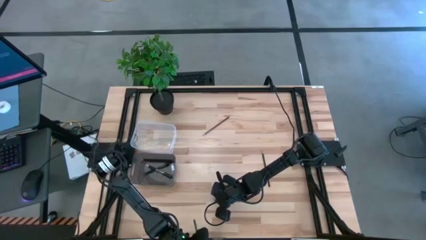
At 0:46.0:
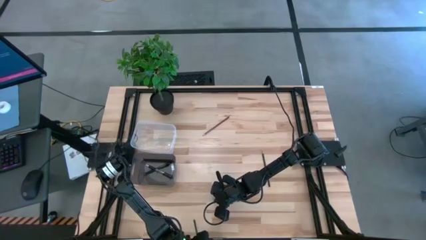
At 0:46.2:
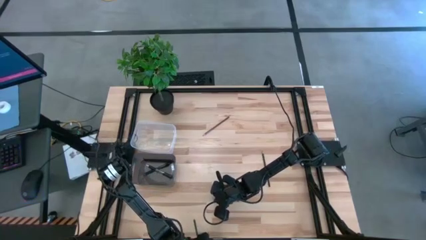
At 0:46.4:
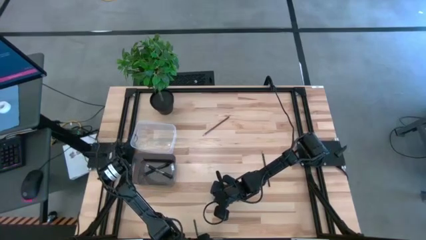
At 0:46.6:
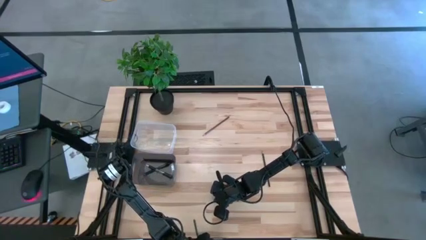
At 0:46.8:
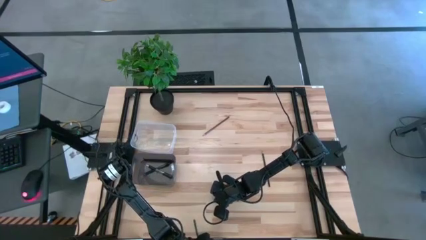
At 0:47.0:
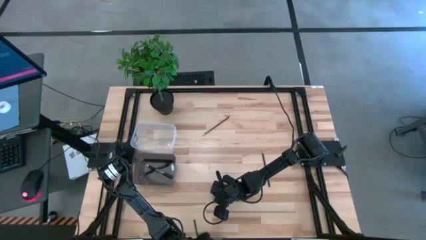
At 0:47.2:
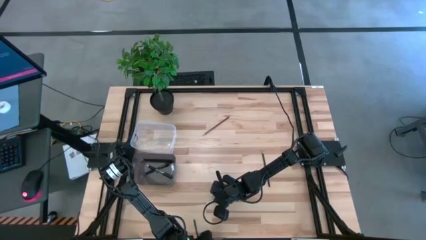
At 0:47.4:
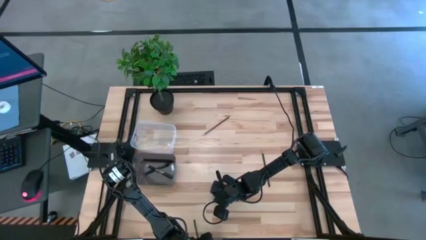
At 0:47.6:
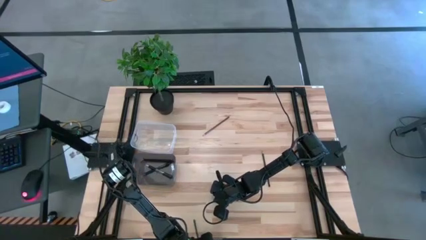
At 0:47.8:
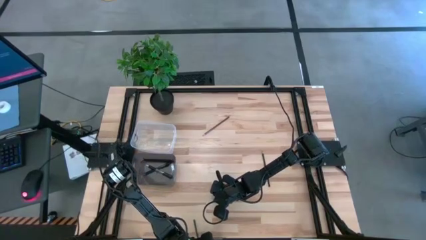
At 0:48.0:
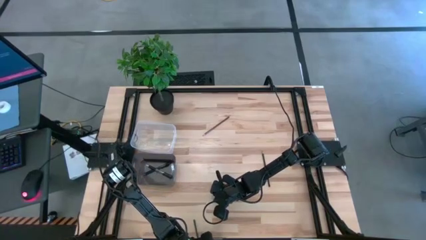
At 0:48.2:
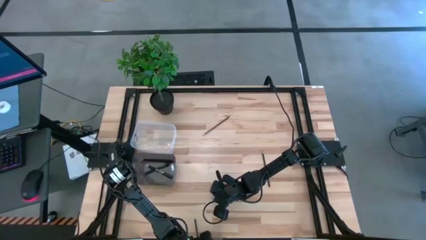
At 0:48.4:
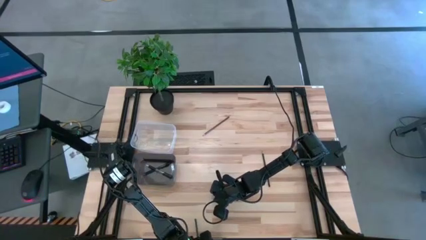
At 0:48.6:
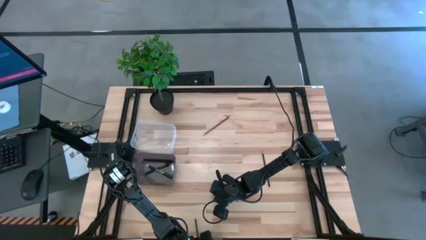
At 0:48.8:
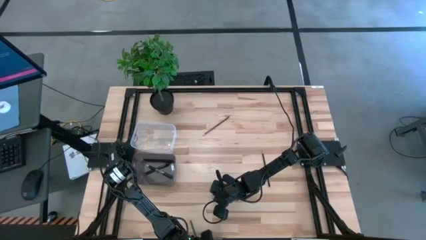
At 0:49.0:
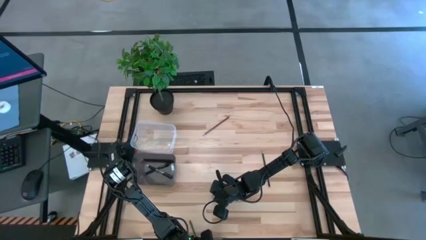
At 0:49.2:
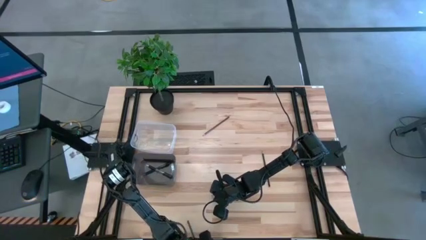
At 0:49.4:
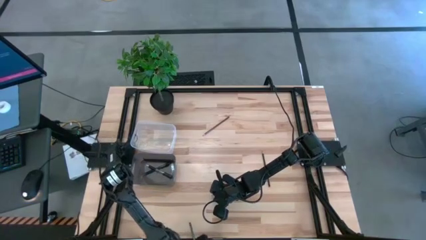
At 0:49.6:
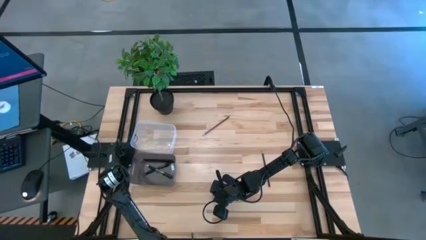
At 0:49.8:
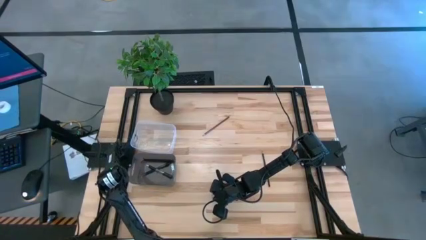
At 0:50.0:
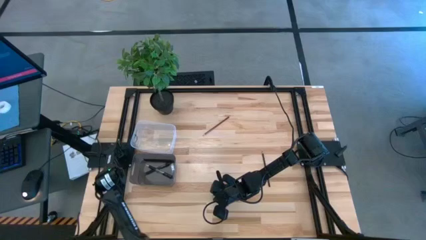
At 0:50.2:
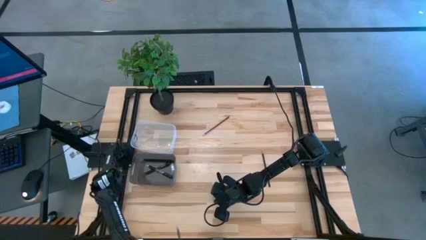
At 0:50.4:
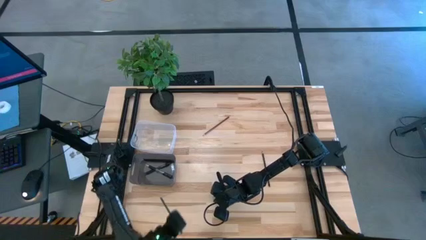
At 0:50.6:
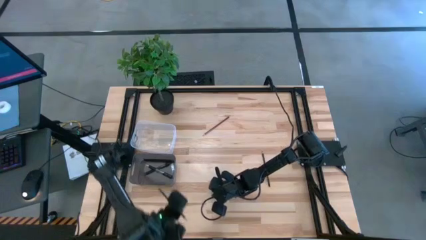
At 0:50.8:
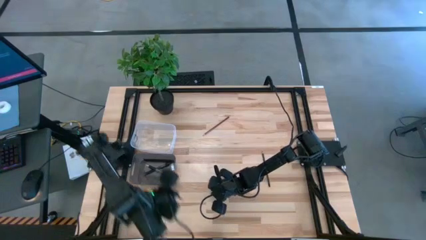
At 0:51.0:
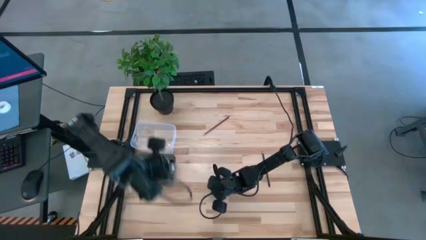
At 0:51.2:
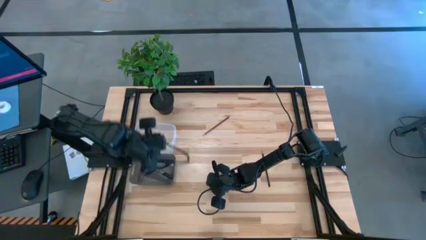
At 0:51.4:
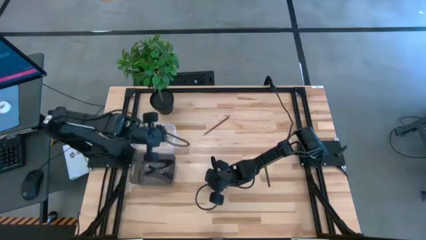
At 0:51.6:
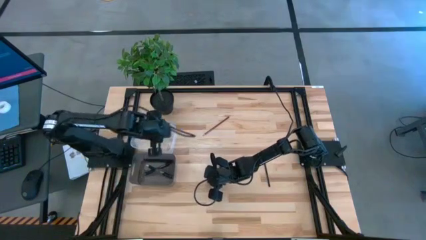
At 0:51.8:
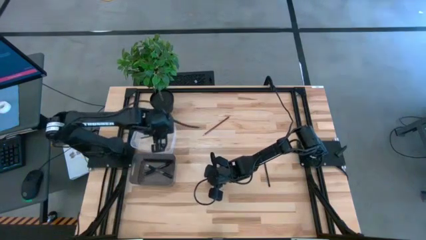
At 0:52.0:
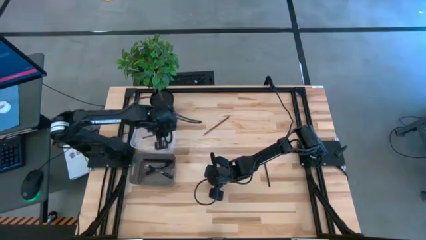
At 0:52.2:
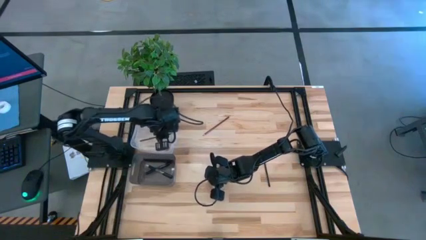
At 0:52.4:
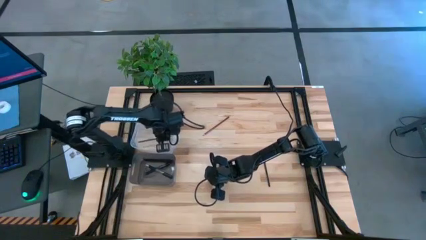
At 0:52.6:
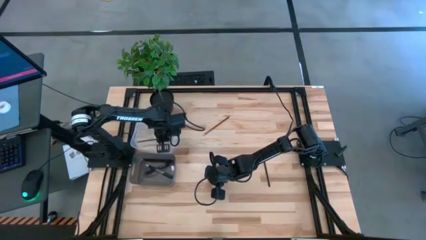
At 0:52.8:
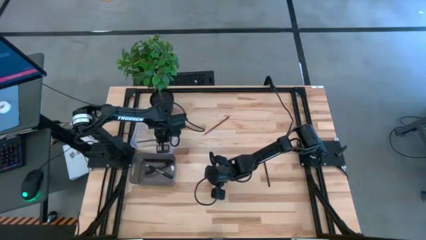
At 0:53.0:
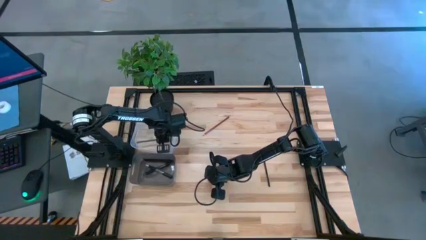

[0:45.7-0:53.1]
Task: Sort pens & pencils
Put the green pencil into the transparent bin

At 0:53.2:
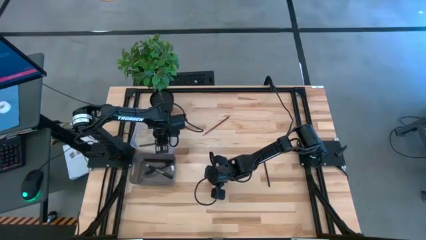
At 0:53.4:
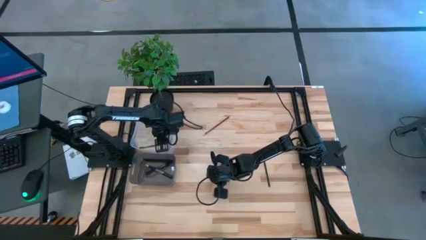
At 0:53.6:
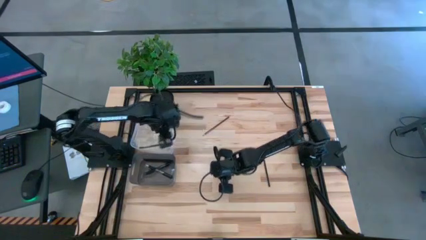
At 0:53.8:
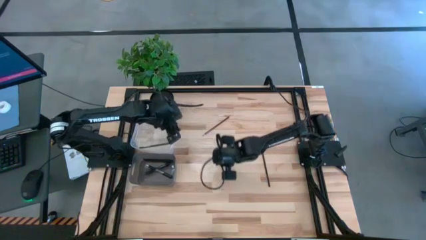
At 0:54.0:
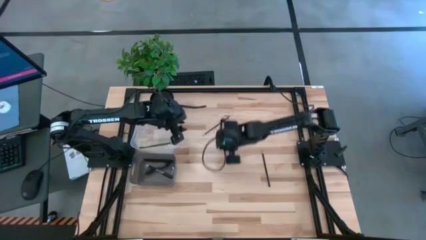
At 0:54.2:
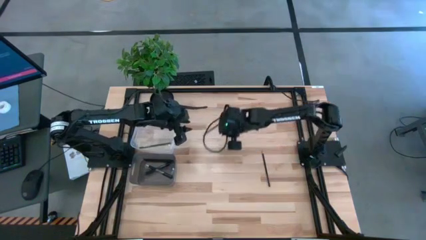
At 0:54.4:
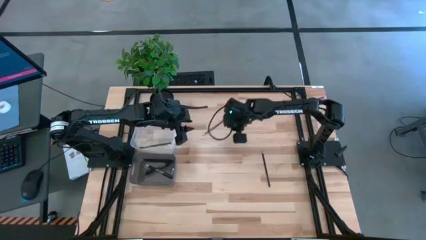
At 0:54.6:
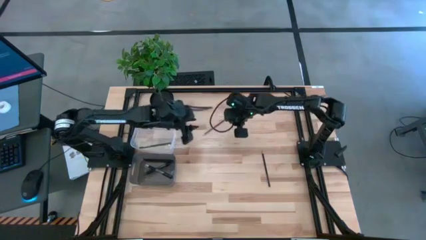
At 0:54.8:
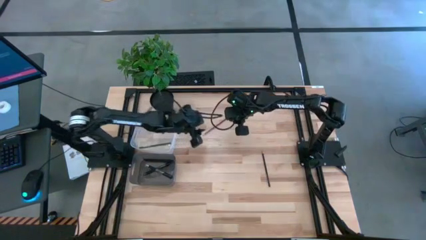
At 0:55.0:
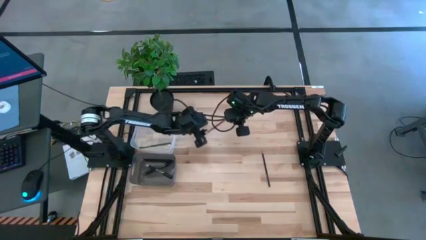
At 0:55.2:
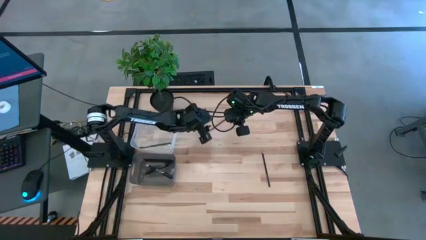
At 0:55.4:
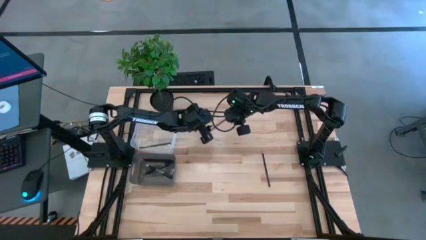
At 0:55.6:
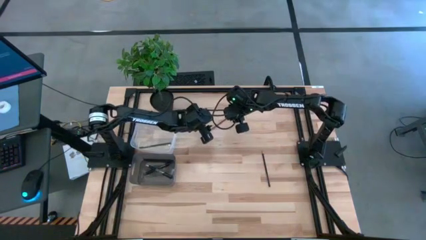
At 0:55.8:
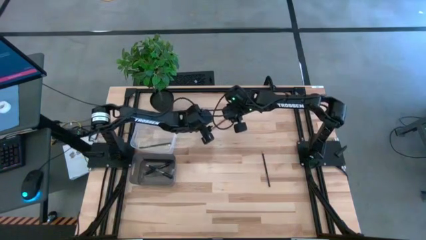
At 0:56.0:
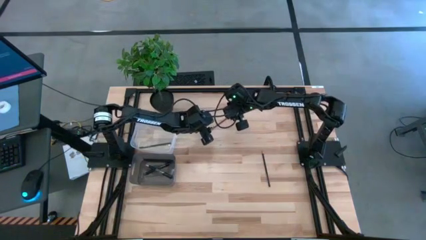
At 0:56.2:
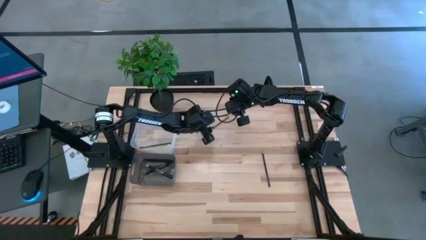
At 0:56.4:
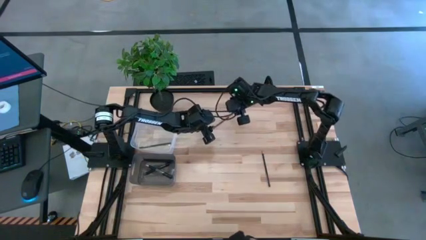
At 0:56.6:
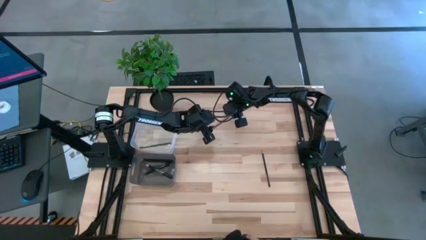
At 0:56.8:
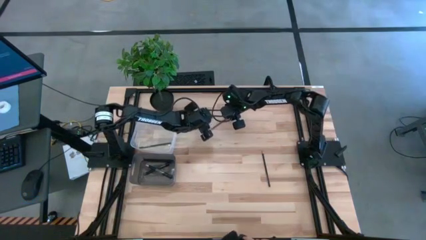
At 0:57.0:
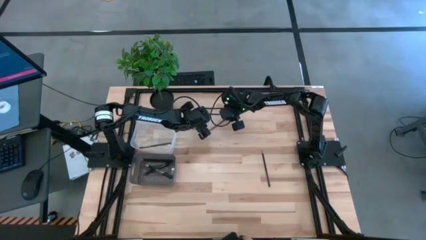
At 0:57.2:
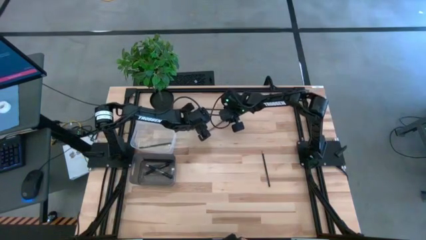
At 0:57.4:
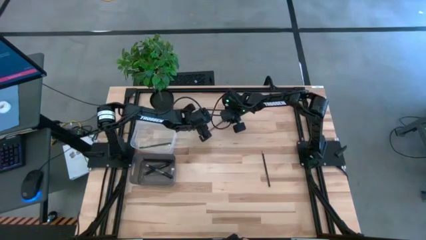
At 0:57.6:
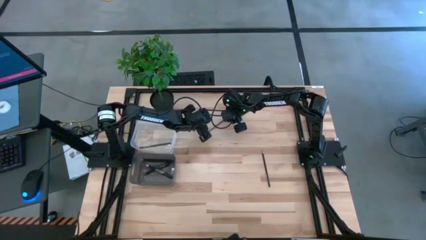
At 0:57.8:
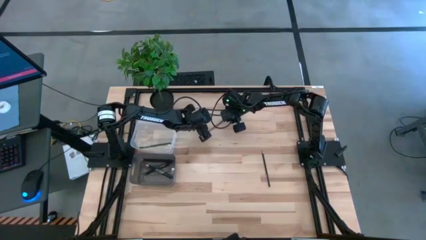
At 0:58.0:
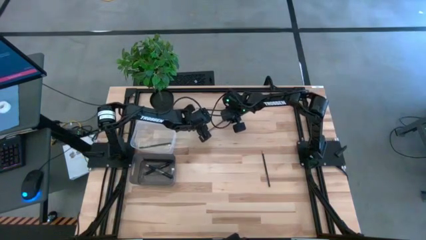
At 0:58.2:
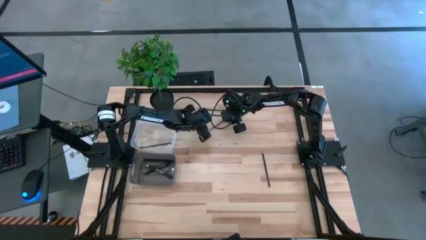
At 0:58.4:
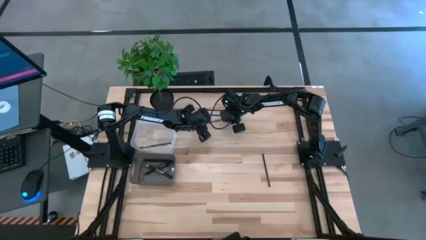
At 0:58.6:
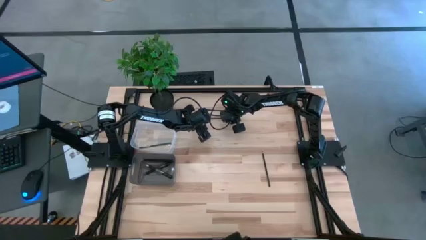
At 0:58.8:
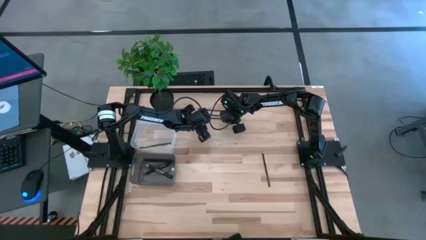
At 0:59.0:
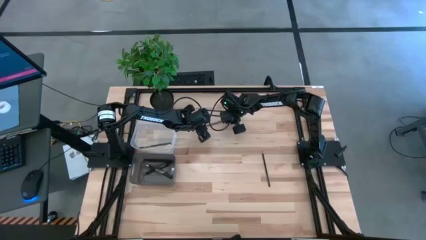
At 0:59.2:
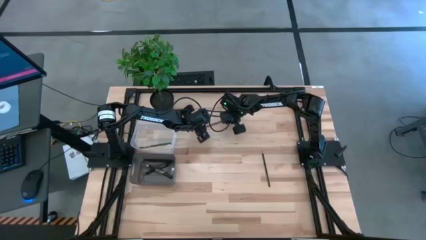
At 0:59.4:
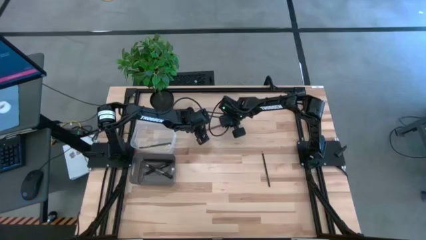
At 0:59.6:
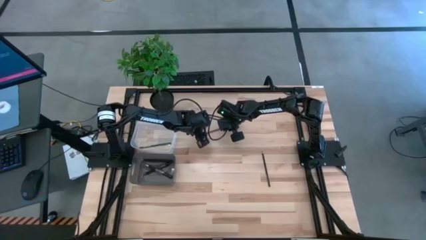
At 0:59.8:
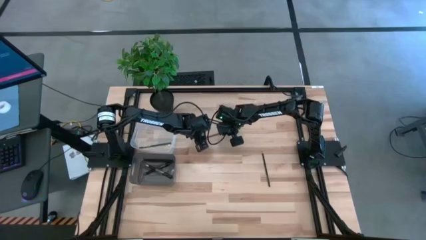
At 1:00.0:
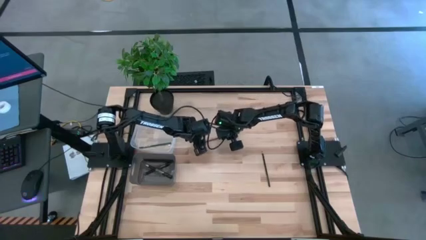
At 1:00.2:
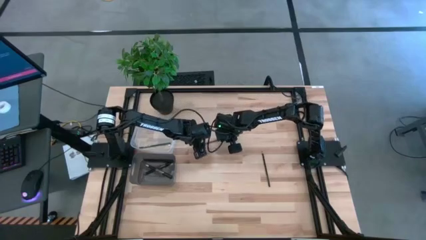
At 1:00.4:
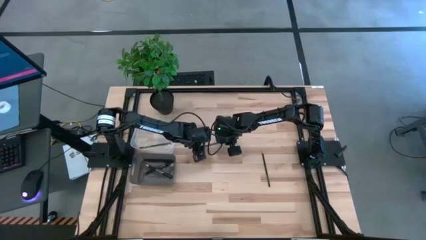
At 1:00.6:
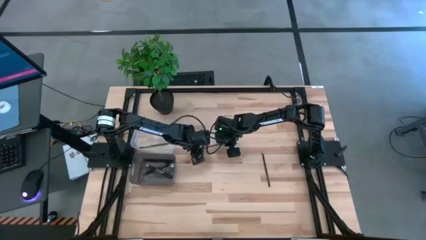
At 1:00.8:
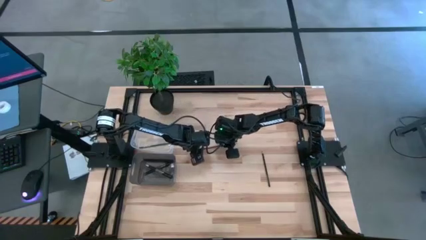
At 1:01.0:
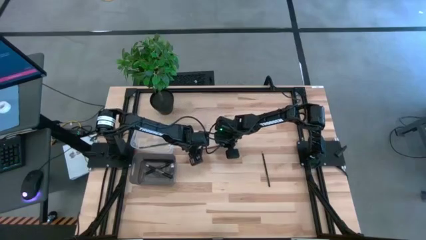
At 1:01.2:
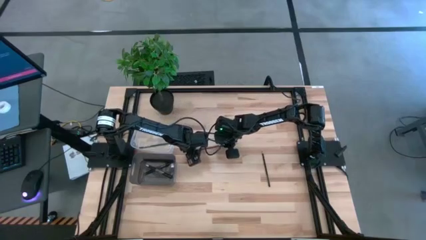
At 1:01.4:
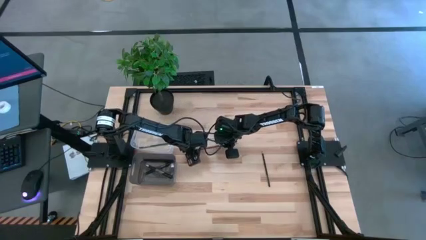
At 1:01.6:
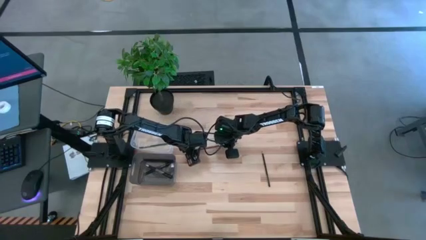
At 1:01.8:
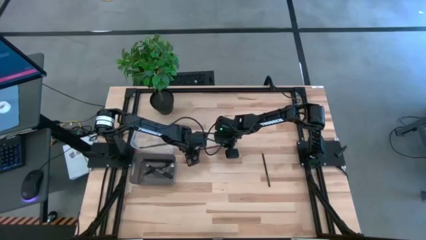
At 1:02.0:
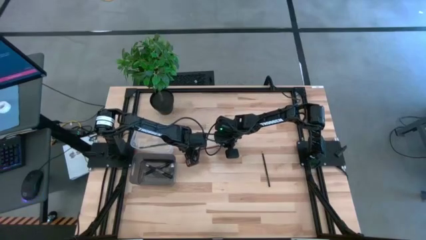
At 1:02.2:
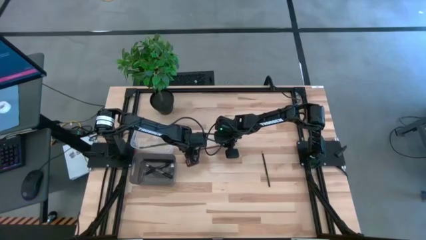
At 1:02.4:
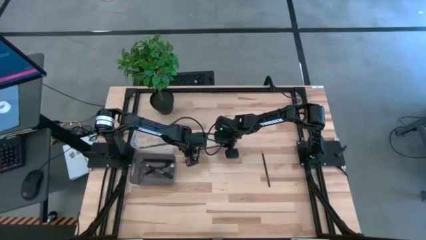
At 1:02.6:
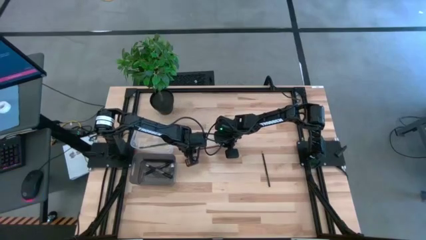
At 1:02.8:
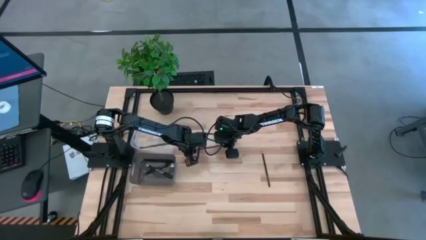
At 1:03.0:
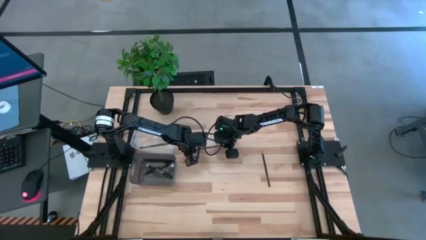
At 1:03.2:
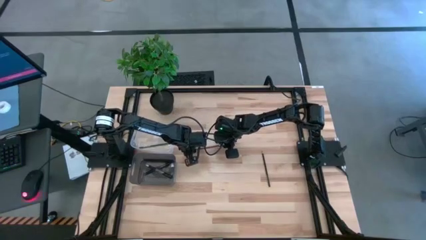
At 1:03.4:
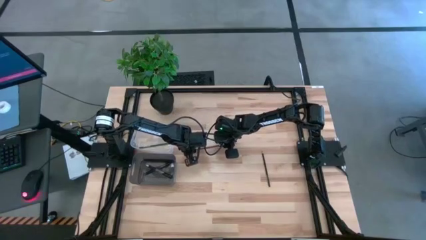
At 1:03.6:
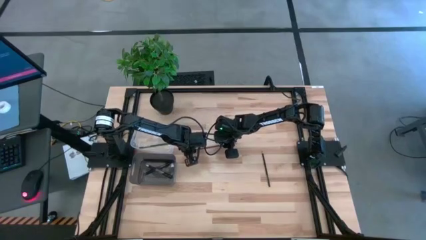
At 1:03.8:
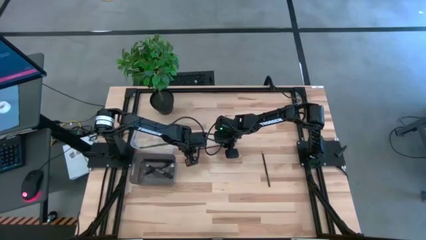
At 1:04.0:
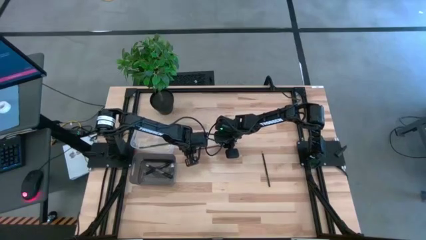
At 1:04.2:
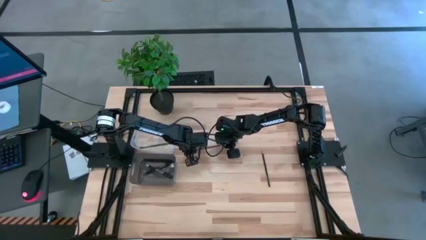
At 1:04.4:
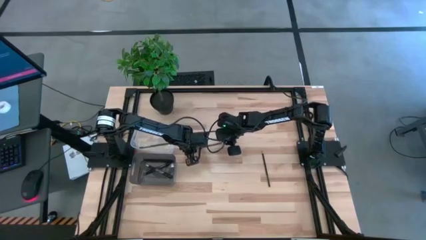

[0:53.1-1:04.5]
Put the red pencil into the transparent bin
